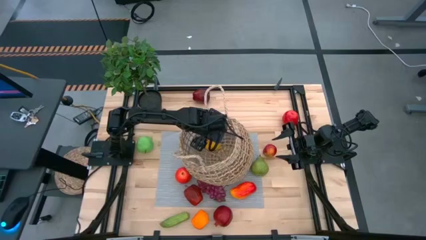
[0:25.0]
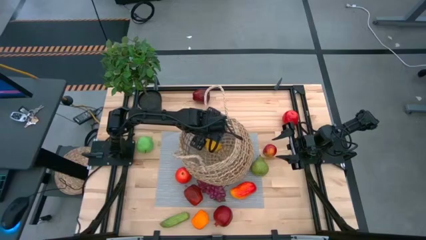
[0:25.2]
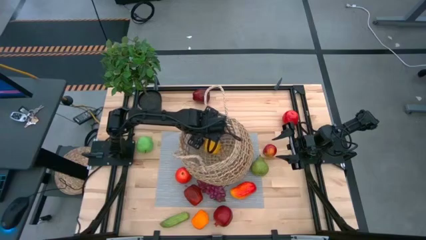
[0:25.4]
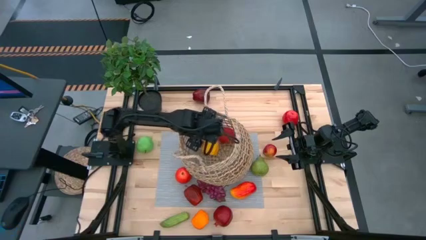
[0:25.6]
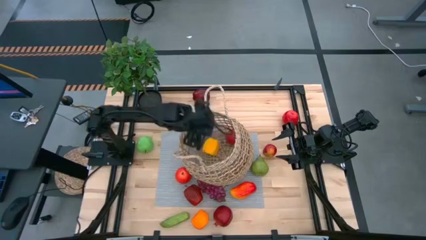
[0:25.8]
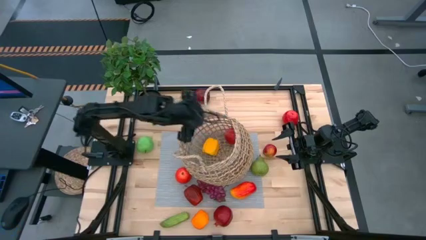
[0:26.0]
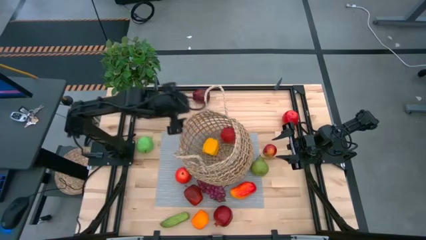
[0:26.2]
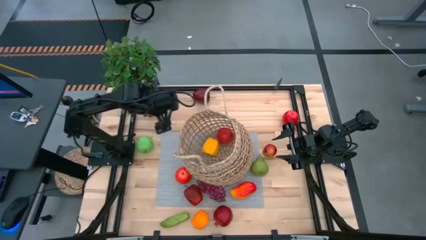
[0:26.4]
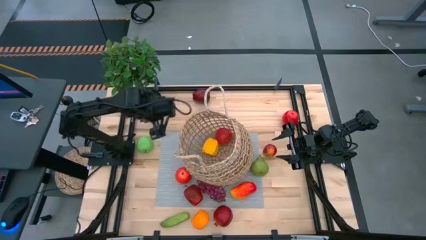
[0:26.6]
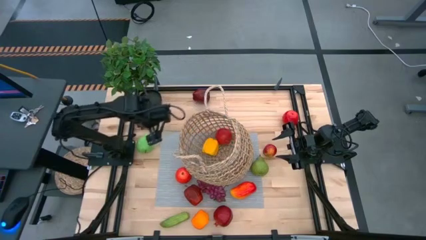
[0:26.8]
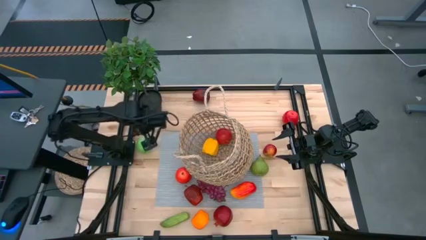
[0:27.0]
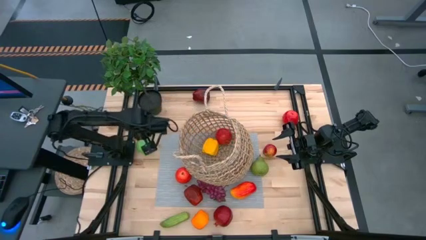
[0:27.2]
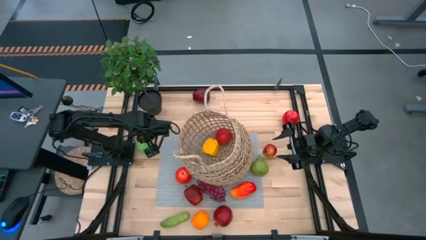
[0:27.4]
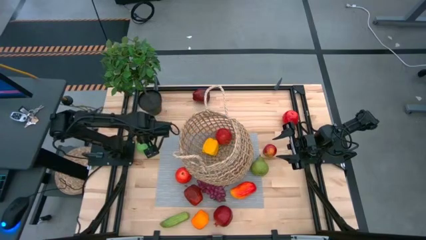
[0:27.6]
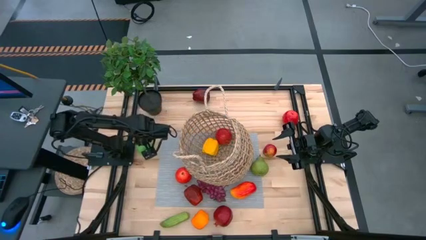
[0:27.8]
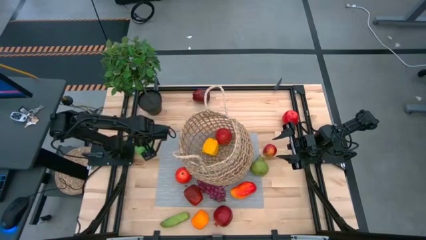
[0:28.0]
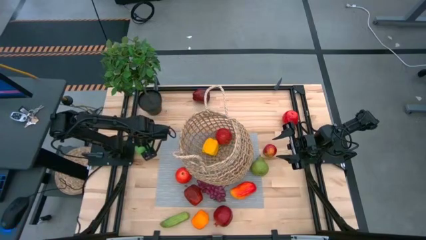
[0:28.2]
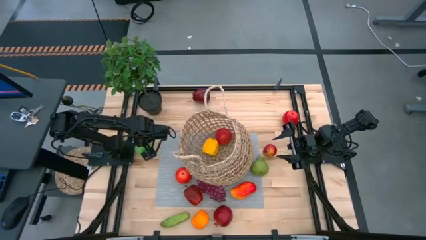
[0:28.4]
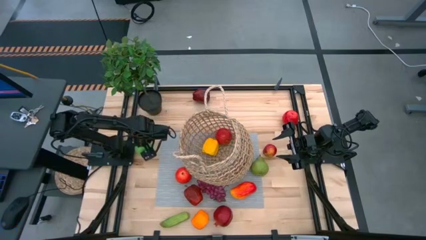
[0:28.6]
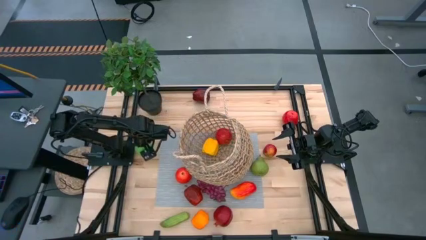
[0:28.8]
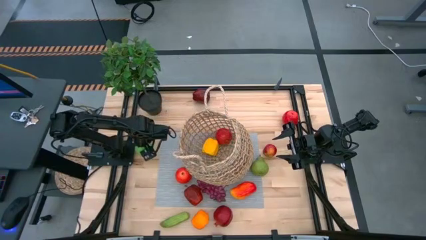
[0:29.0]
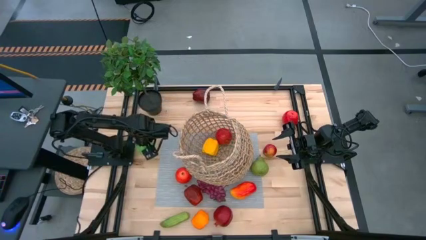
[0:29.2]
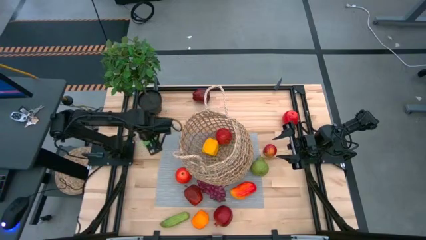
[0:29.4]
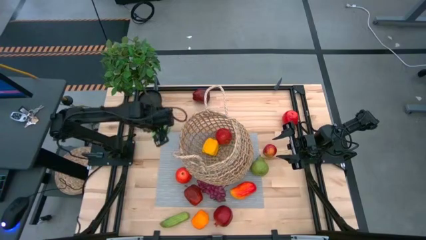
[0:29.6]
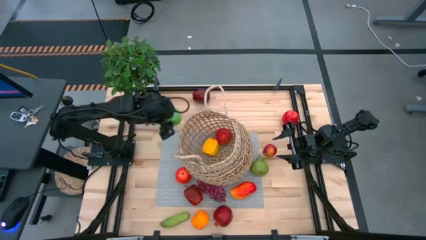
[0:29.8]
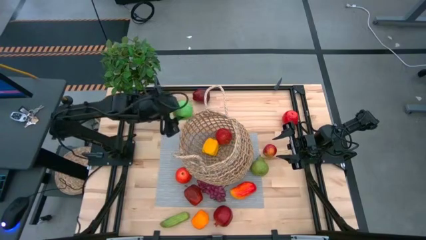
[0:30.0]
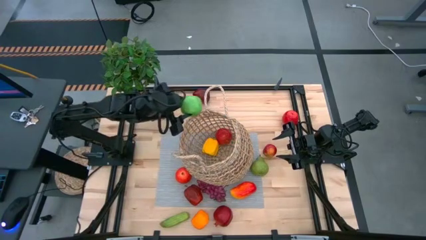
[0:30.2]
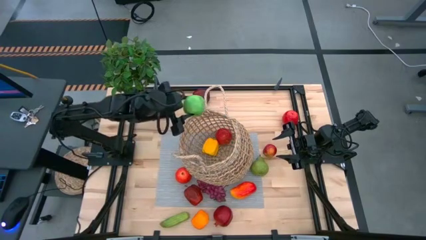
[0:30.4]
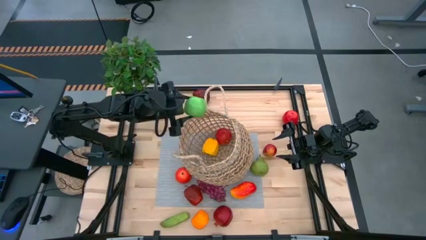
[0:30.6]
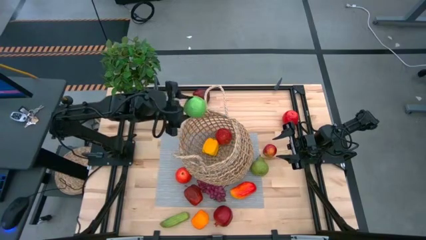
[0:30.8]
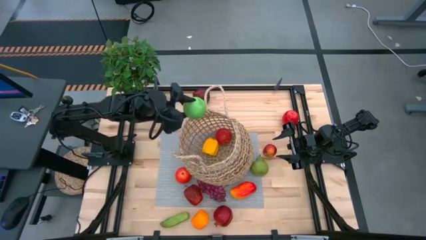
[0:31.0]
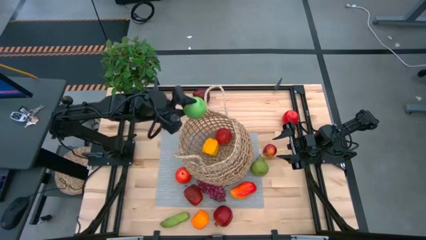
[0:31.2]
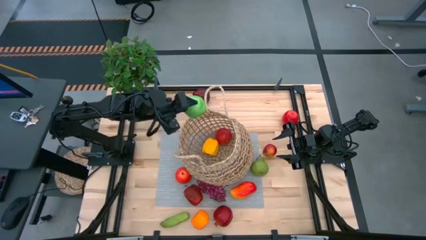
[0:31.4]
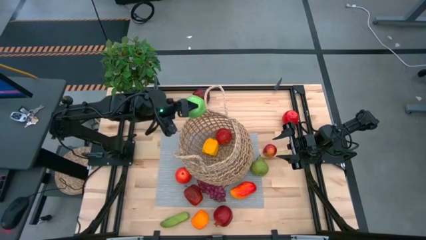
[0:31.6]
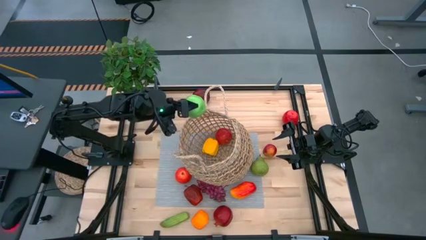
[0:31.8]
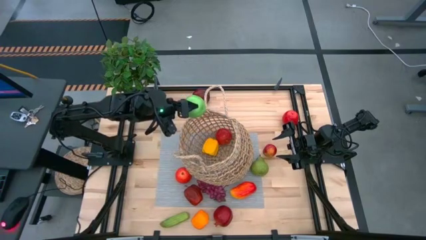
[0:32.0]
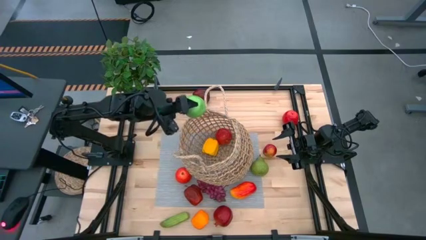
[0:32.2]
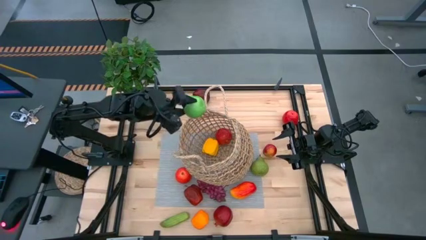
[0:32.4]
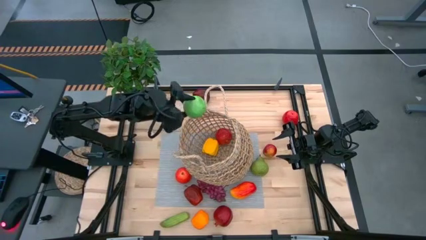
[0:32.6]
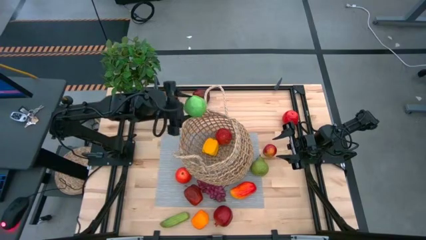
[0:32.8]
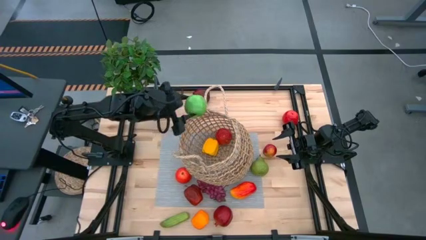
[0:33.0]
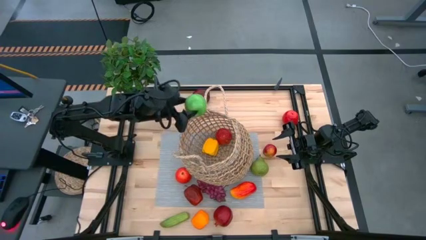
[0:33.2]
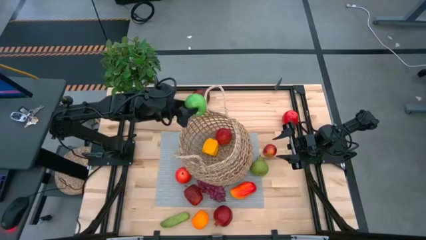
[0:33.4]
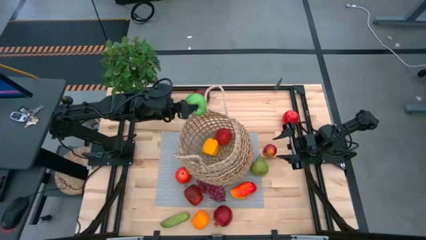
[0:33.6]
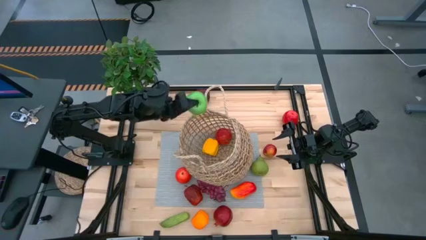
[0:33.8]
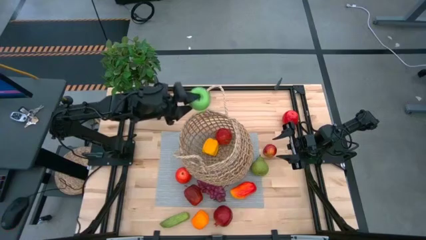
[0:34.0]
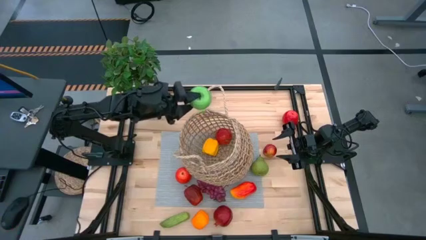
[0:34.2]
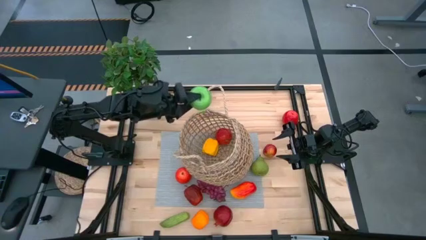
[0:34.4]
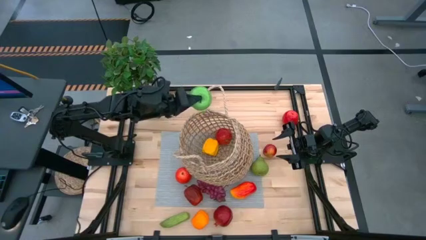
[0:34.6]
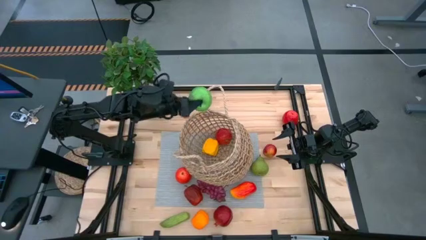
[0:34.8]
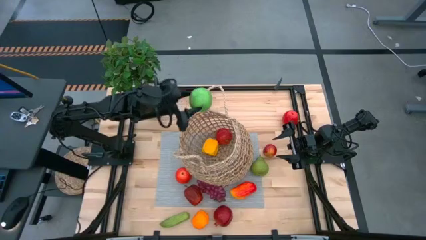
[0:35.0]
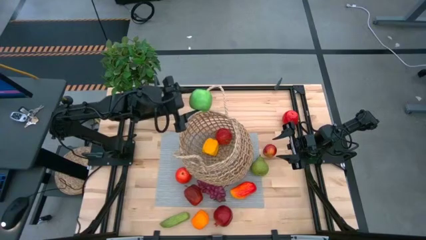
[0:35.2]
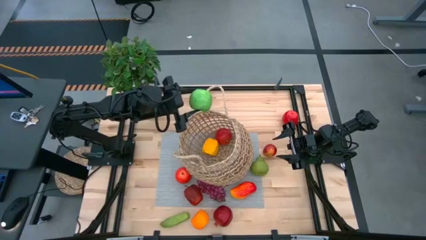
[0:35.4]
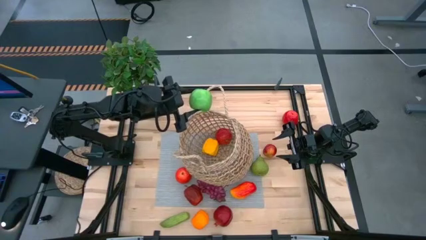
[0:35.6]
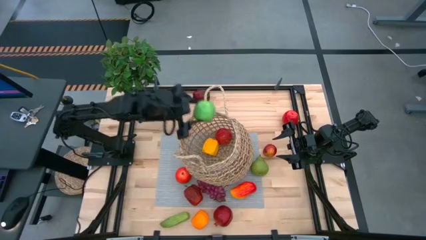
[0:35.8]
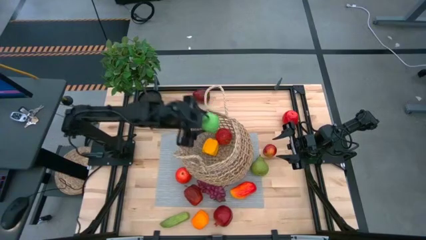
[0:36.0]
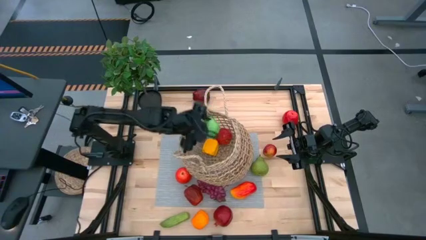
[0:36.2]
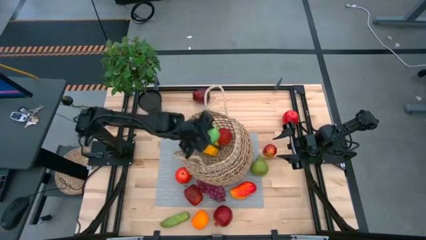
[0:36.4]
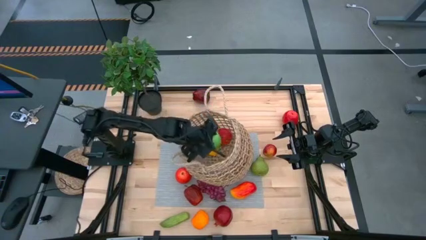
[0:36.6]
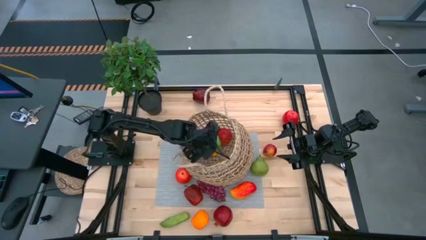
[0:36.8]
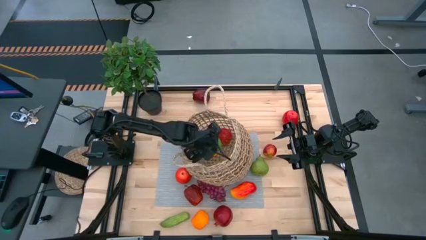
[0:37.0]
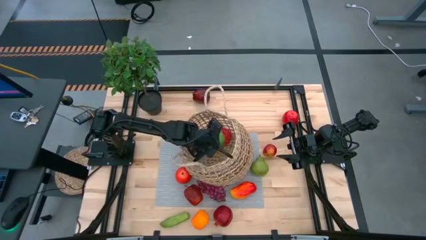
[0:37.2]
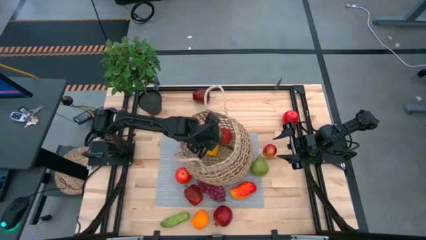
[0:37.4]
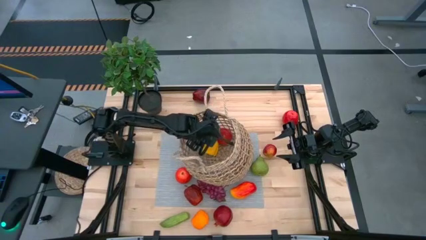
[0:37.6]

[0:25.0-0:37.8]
Task: Build produce basket
Put the green apple into the basket
